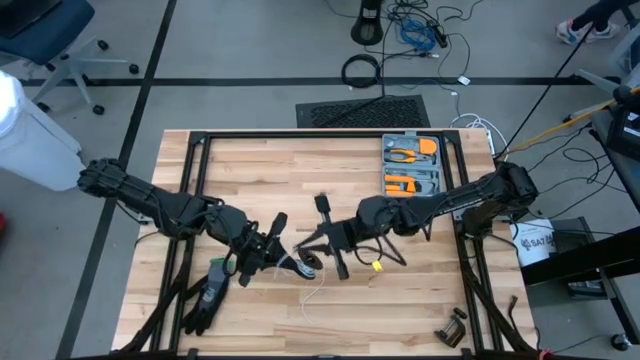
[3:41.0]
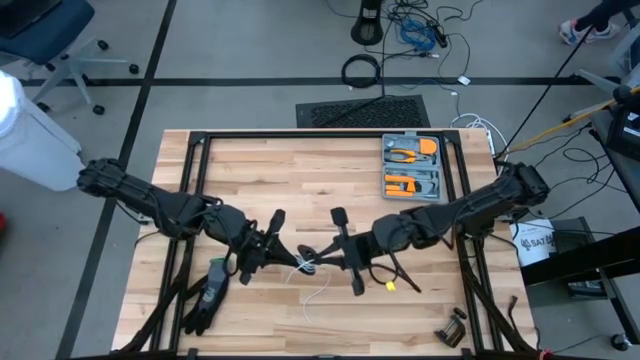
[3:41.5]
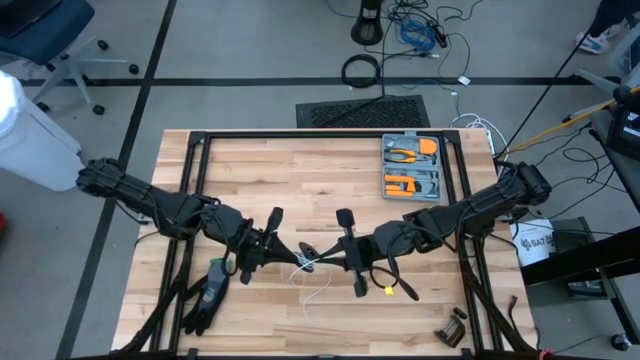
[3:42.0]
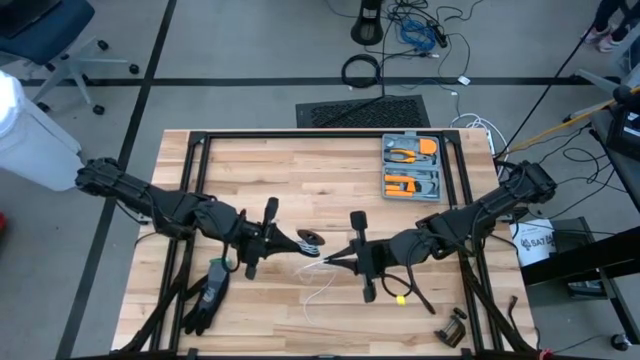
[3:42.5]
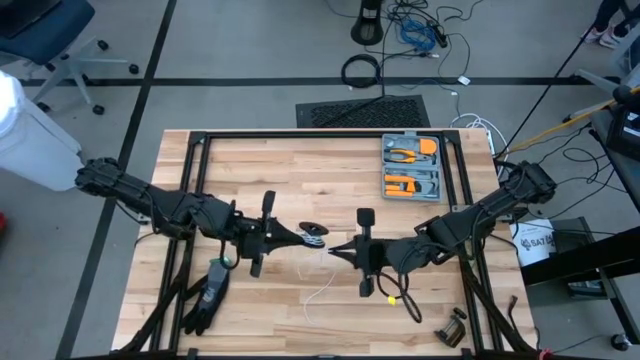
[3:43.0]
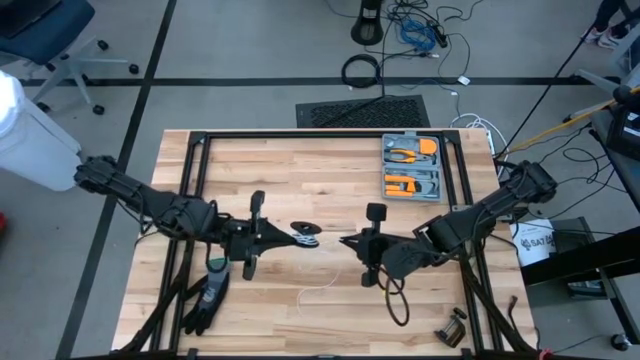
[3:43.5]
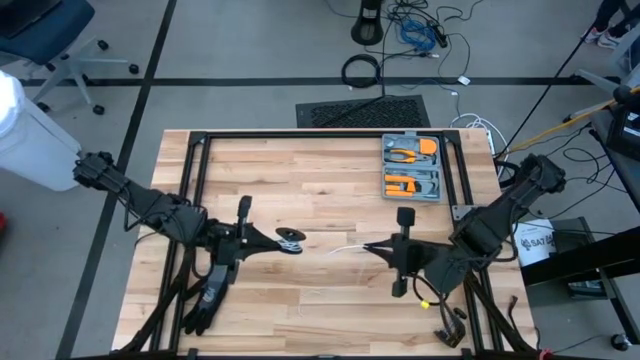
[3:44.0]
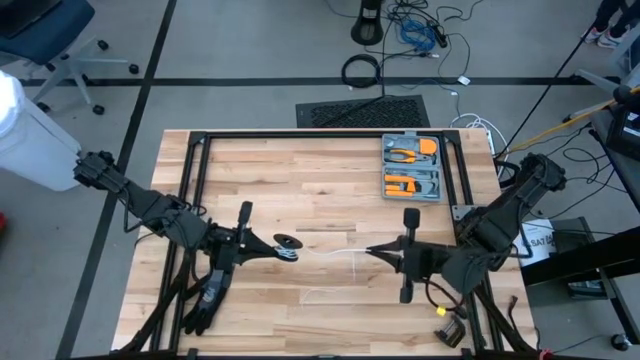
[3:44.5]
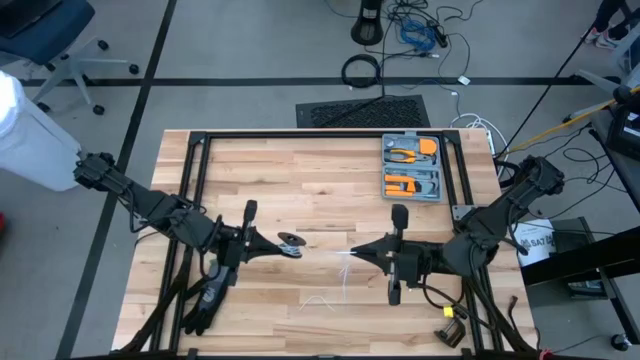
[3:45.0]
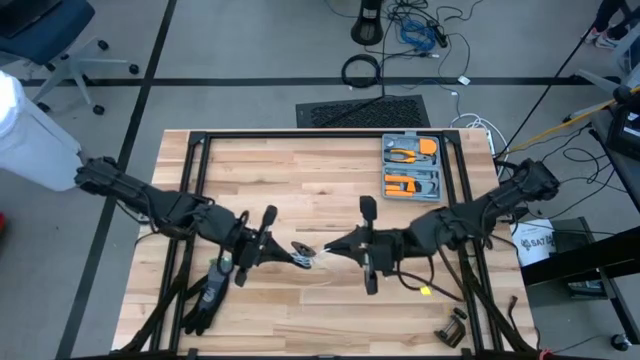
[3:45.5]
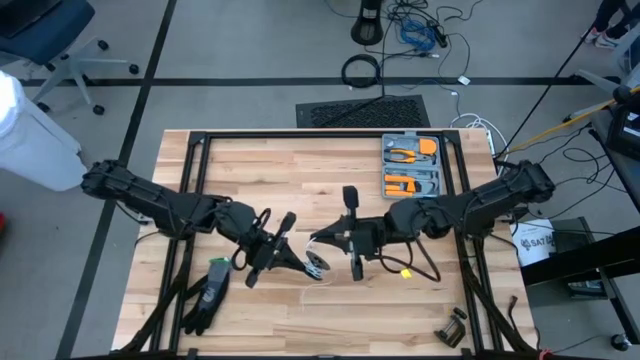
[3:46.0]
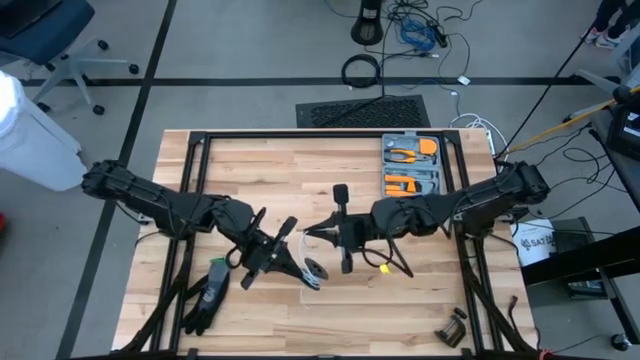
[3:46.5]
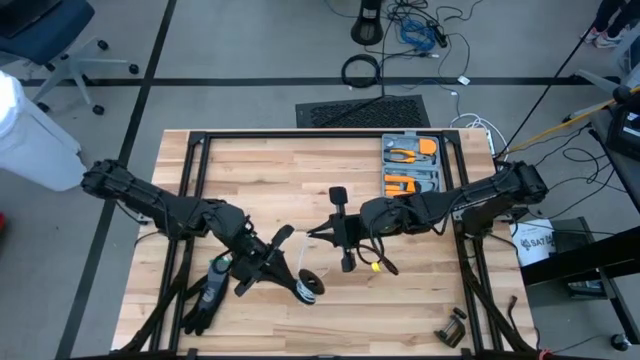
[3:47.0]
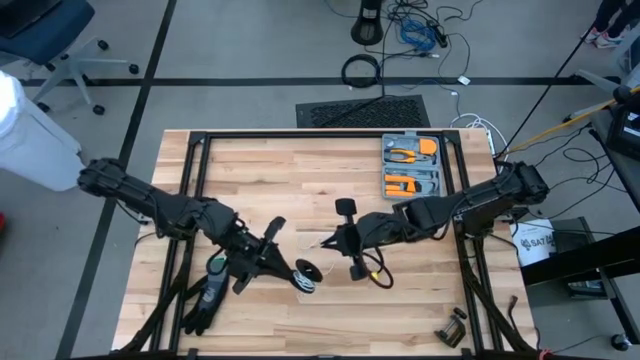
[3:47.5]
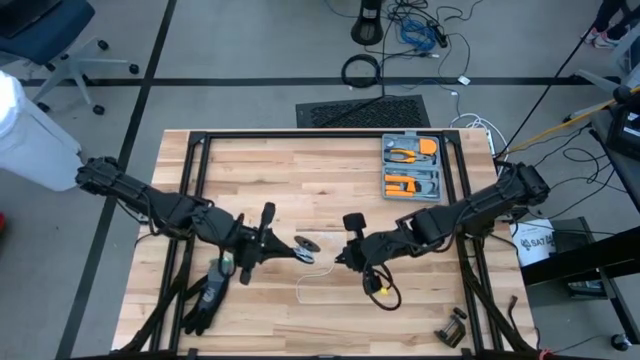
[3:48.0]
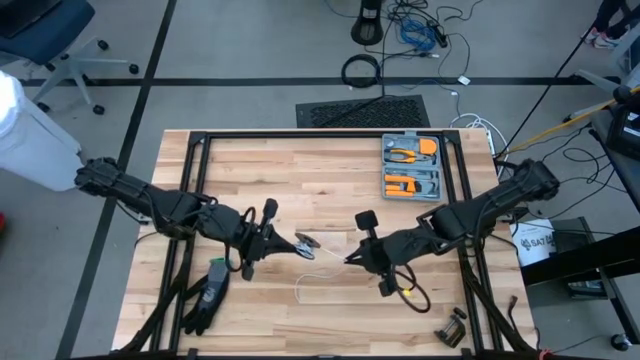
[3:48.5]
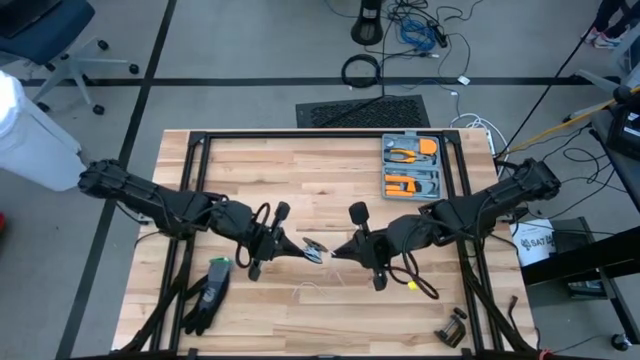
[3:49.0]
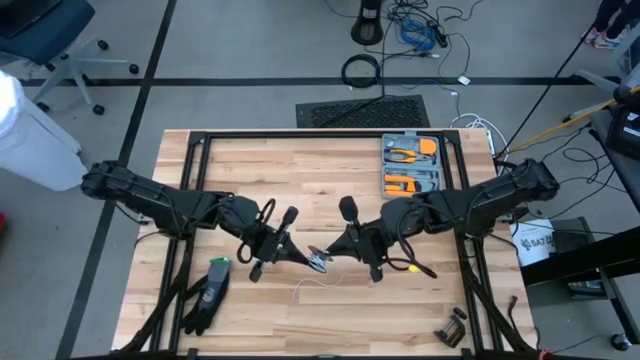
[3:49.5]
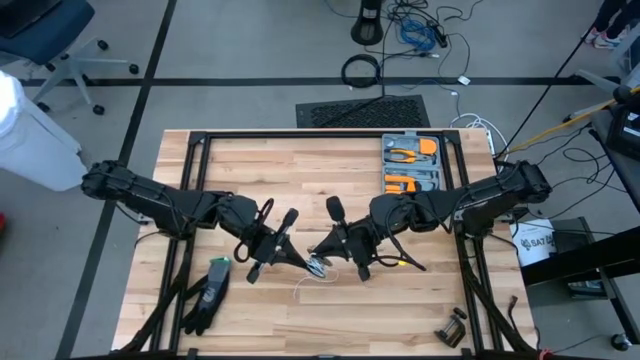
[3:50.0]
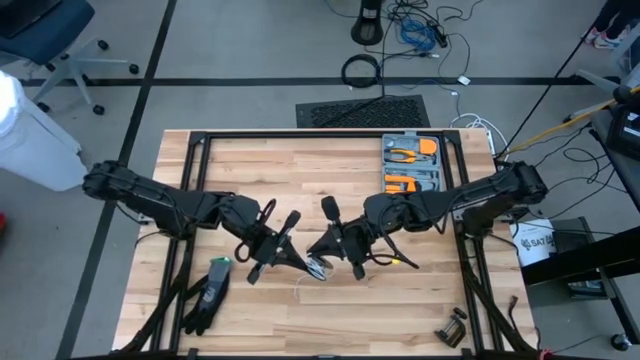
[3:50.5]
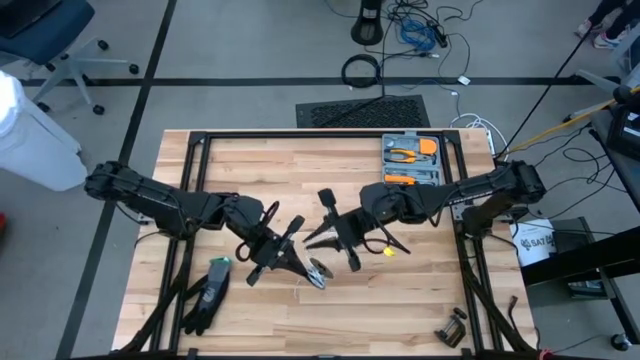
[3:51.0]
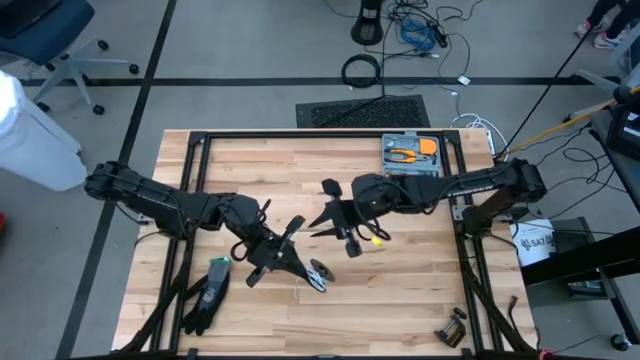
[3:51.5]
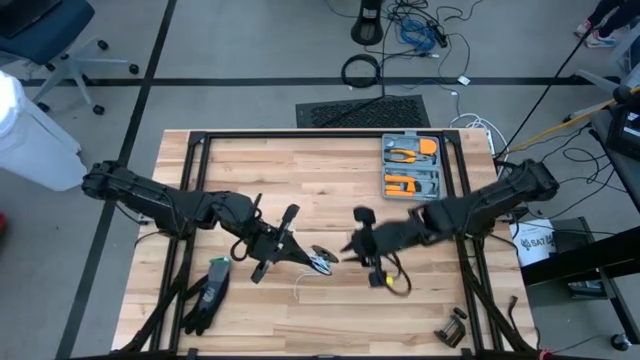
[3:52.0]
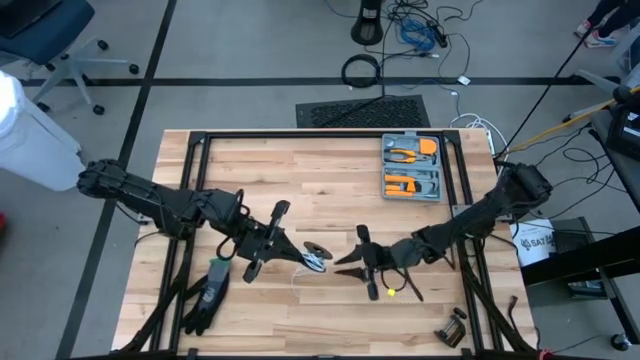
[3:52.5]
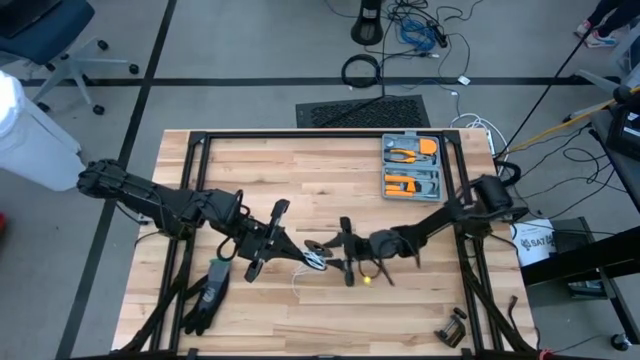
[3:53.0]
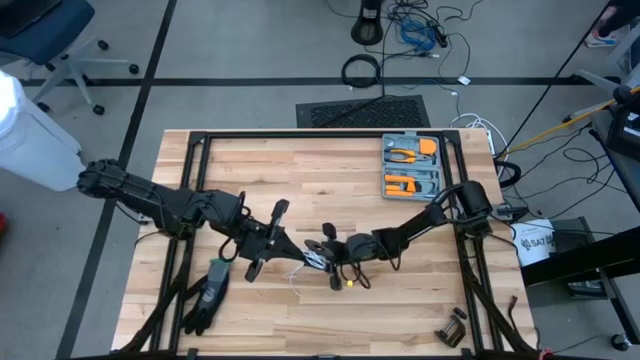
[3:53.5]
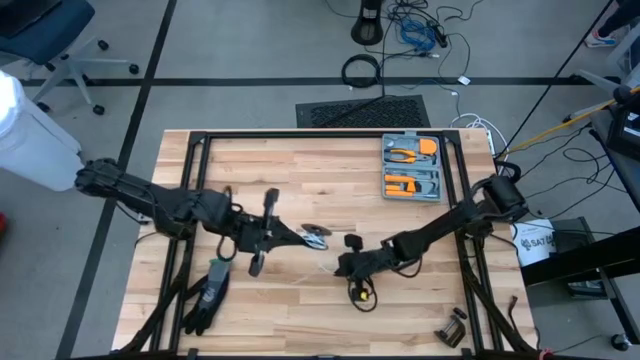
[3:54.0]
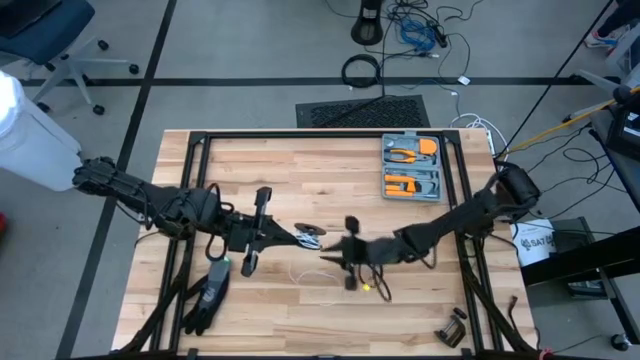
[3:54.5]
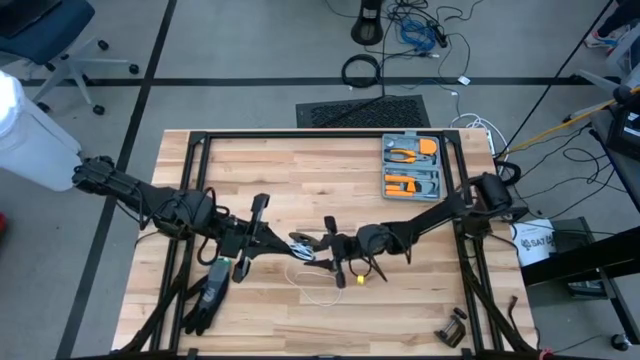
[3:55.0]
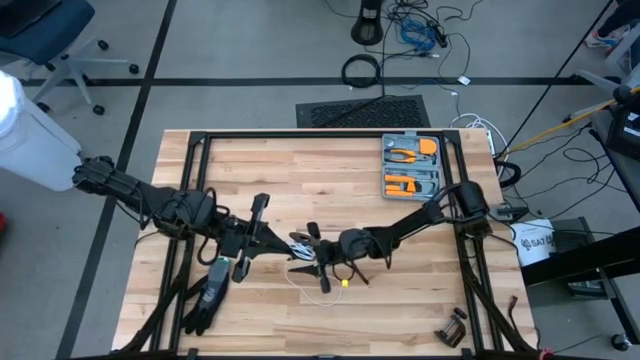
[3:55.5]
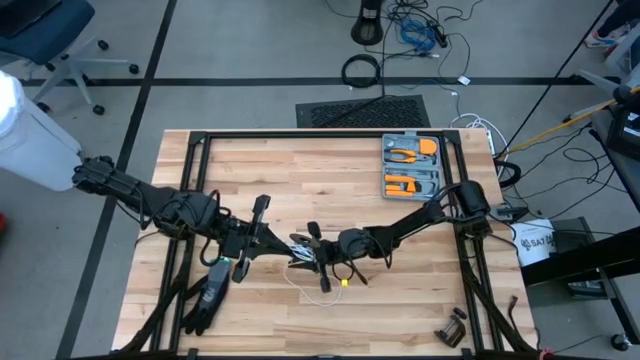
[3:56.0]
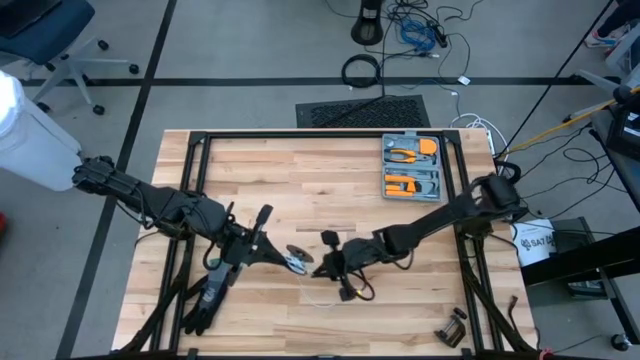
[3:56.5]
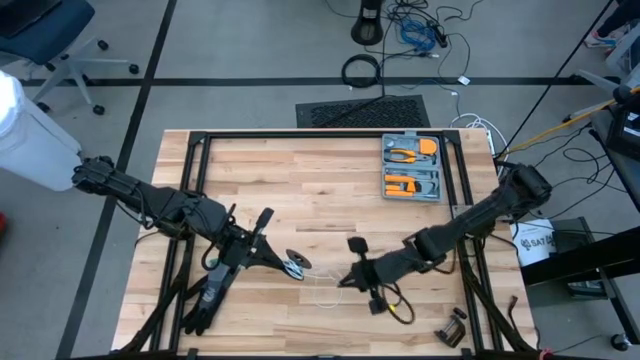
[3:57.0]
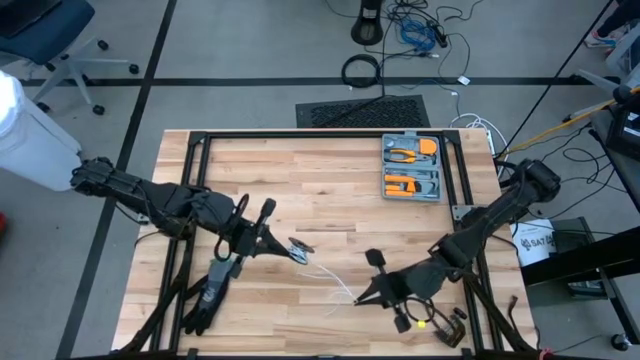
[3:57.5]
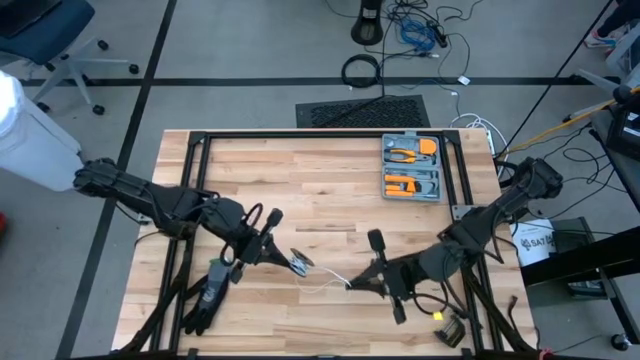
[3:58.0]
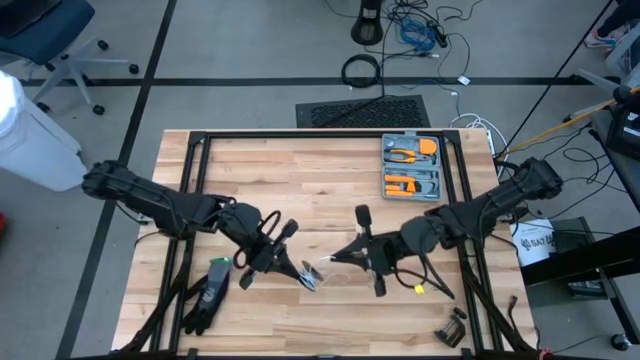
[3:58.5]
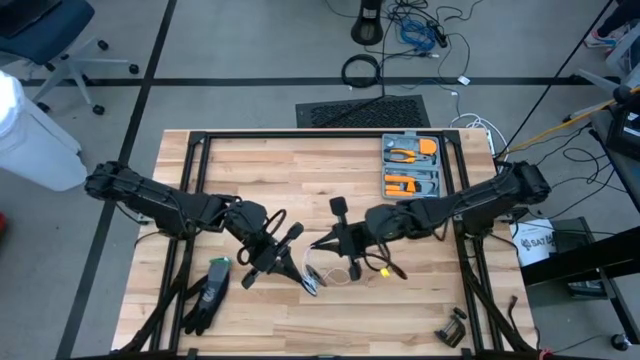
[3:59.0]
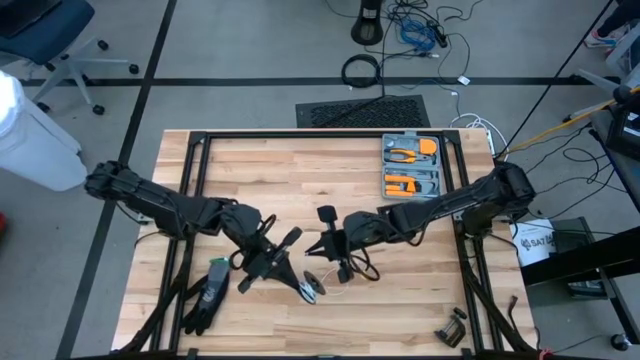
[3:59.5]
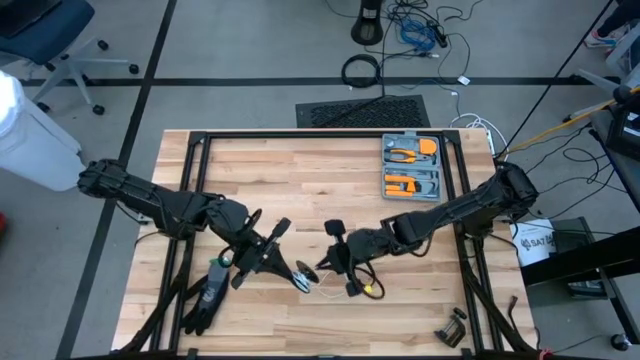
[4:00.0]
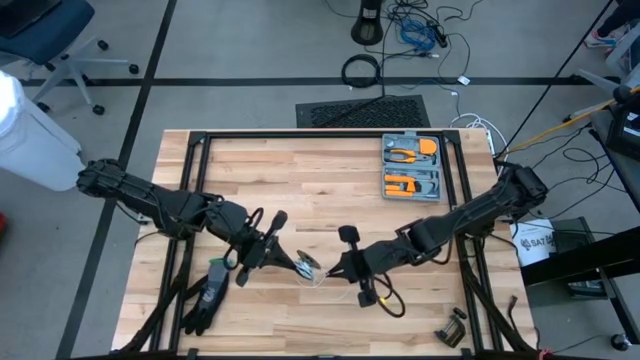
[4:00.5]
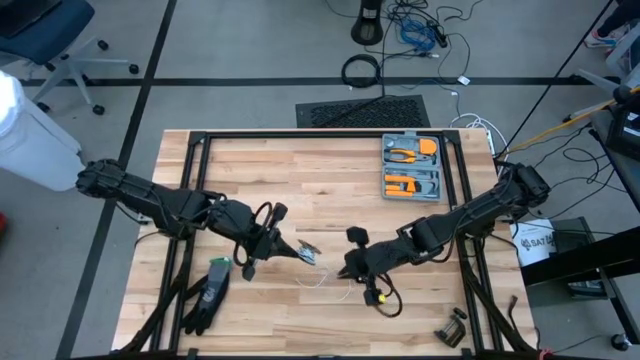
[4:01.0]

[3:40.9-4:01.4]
Task: Coil cords
Coil the white wire onto the spool
